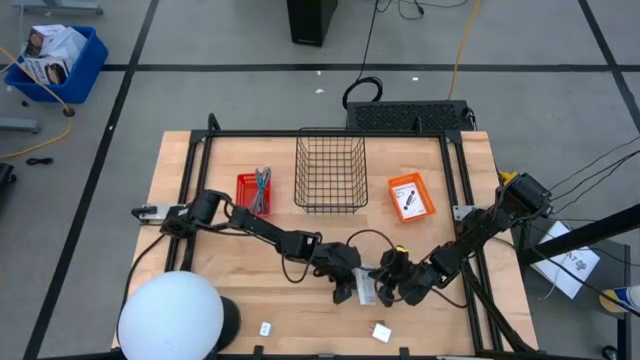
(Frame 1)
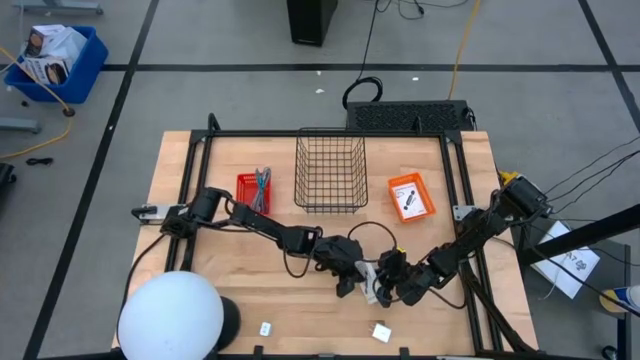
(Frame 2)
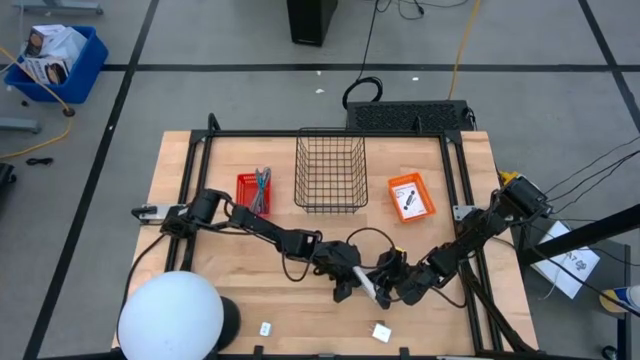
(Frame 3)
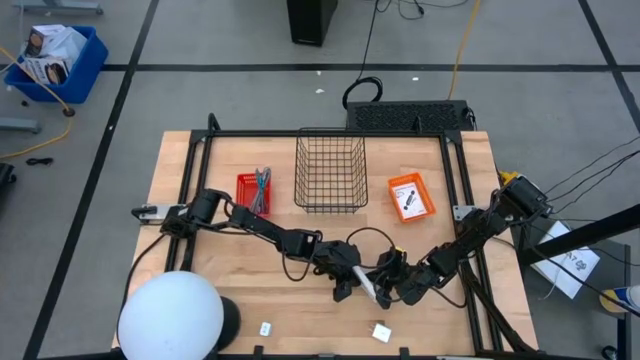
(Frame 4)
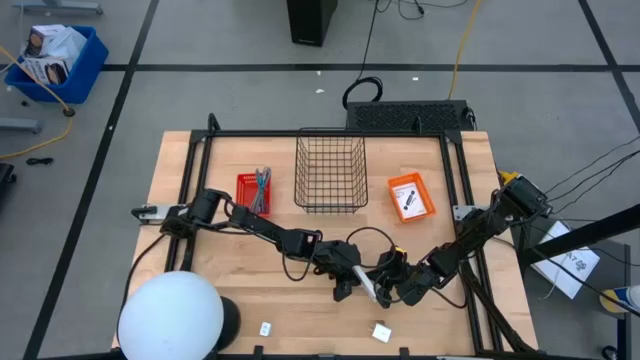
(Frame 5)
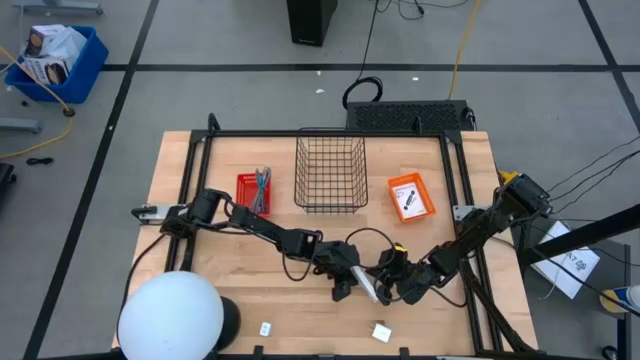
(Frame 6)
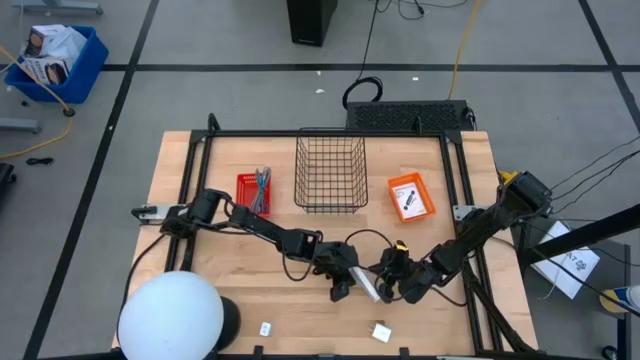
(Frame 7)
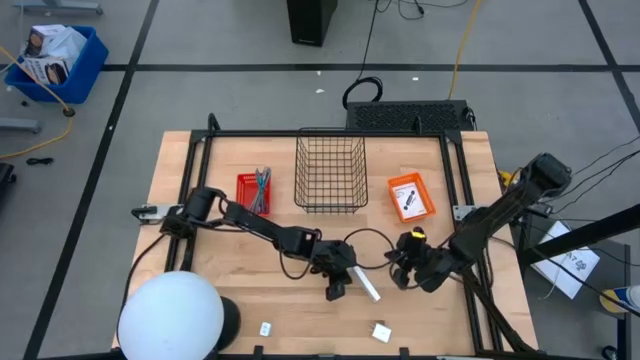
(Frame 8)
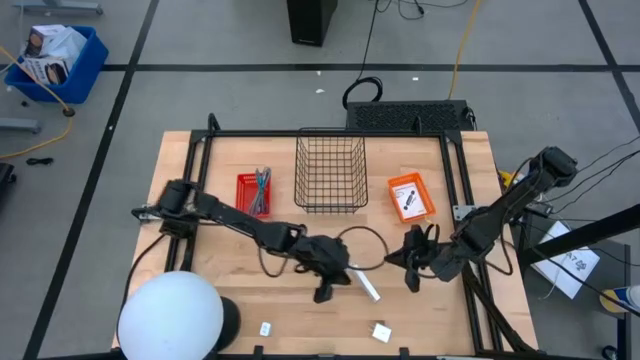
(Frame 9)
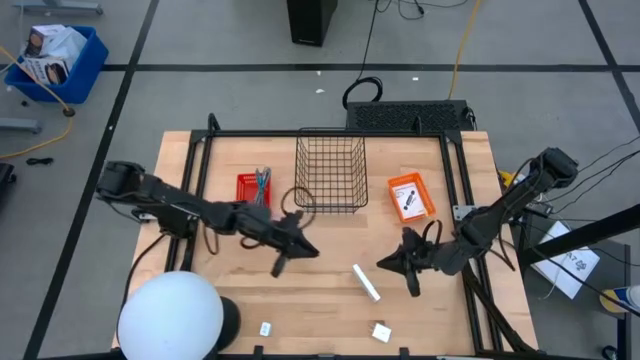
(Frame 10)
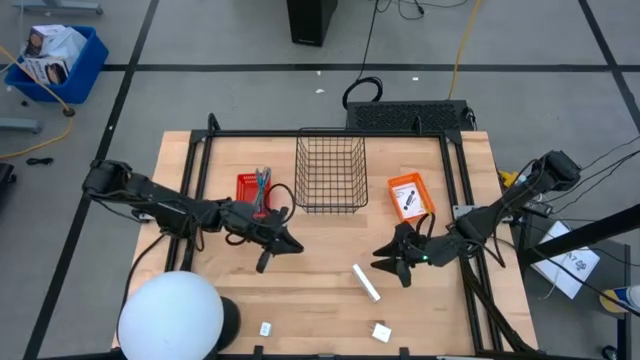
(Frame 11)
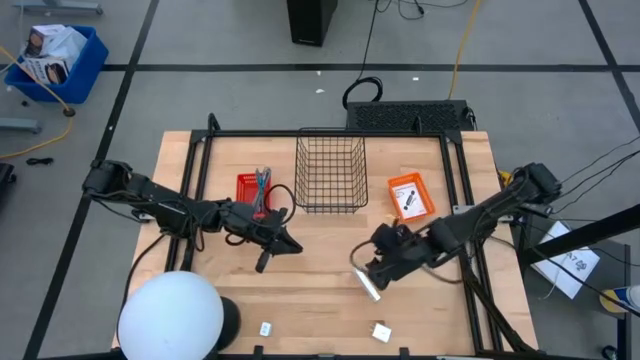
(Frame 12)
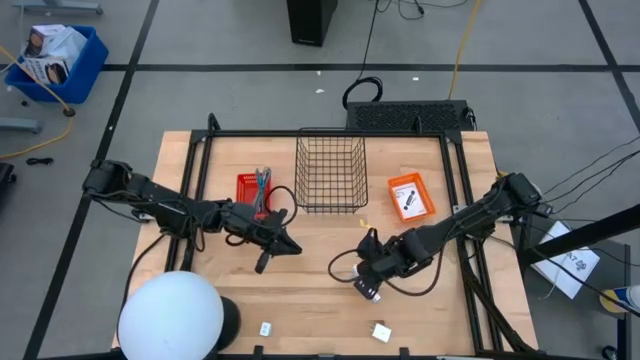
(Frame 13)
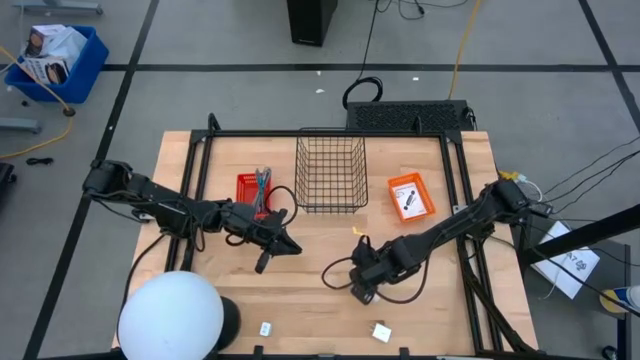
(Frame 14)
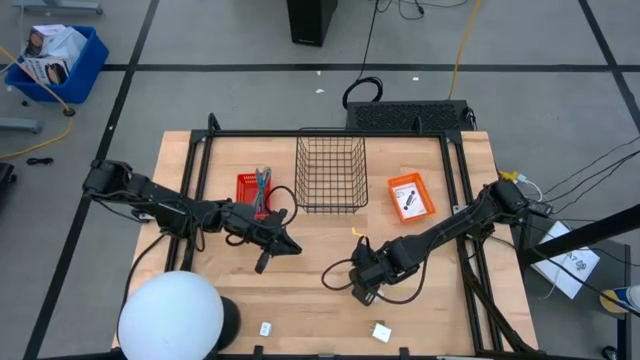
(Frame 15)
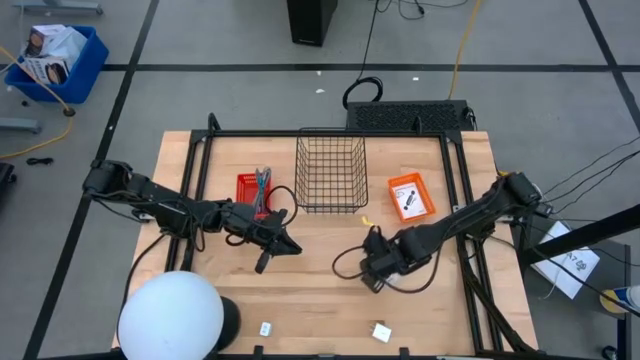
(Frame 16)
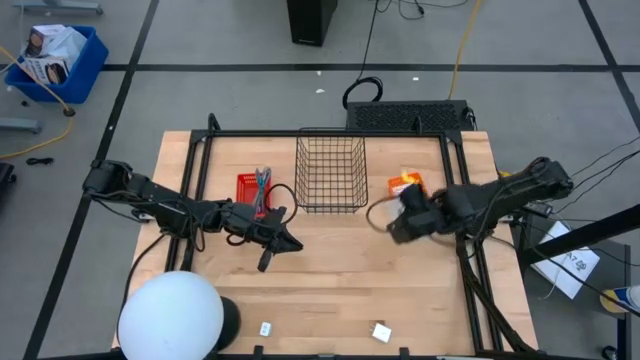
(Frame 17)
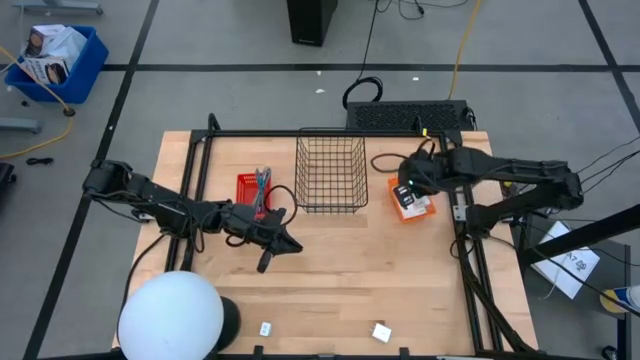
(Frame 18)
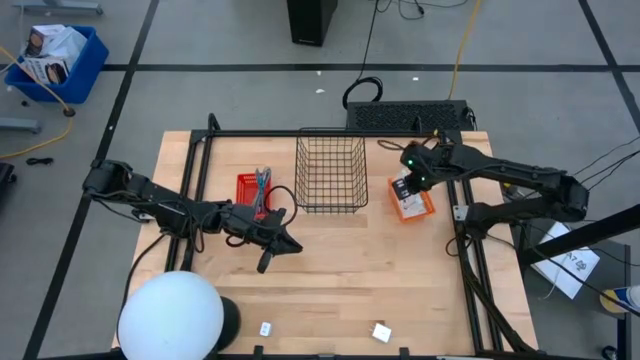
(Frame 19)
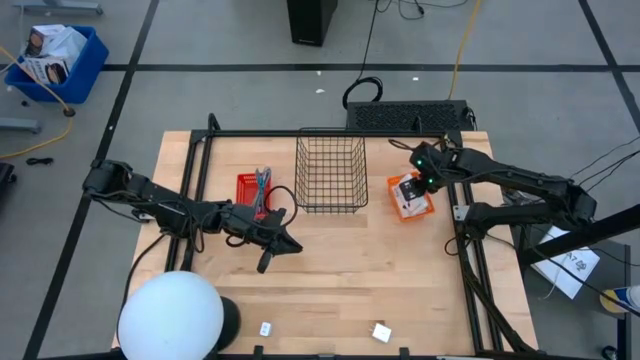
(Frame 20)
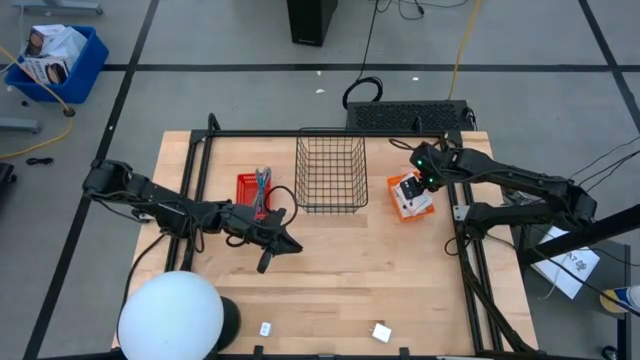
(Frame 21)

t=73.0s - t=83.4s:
Task: Pick and place items into bin
Put the card reader box into the orange basket

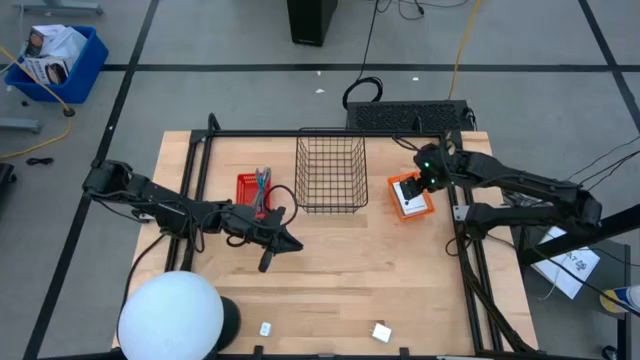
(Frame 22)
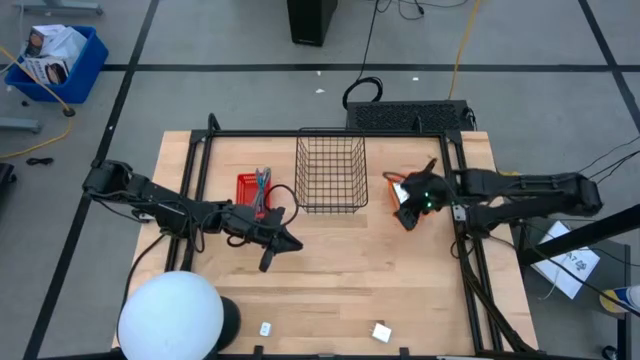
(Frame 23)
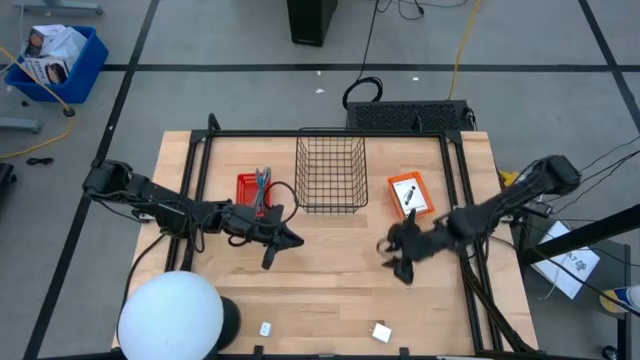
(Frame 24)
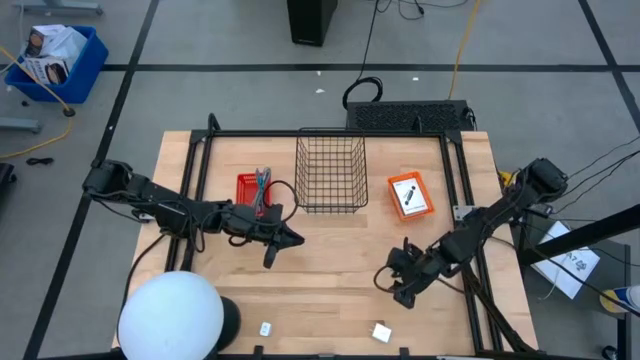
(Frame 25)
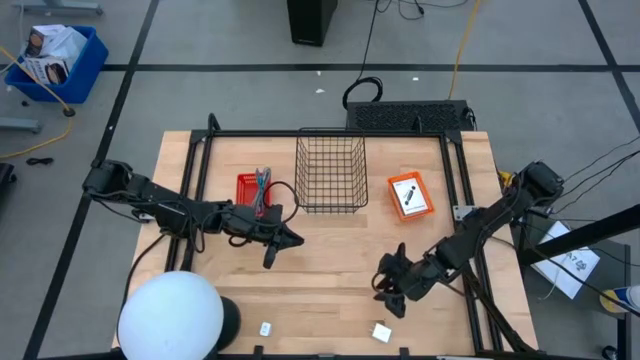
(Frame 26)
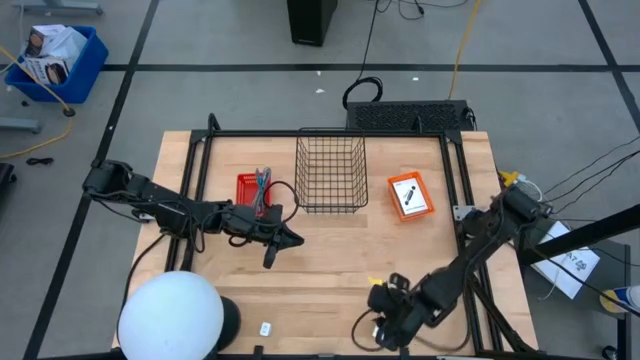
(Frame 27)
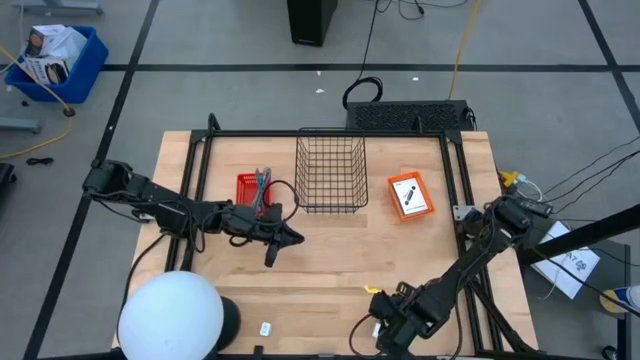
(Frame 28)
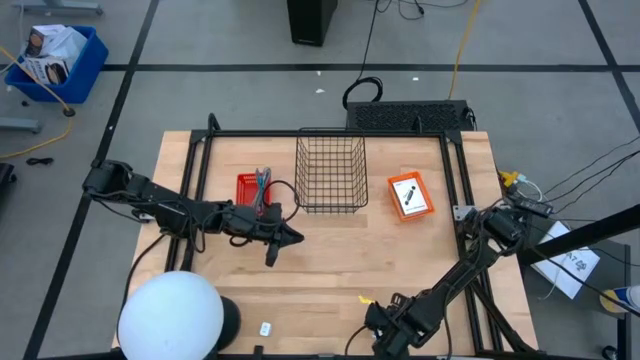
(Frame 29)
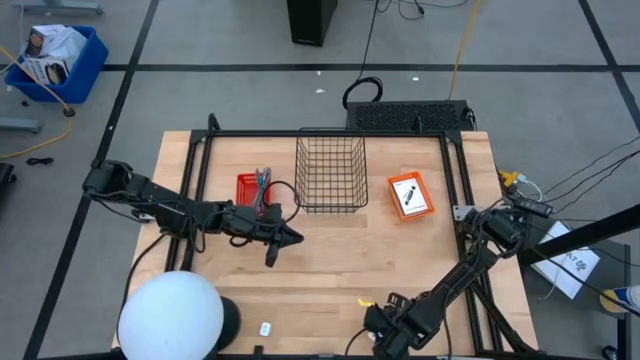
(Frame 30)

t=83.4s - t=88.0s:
Put the right white charger adapter into the wire basket
